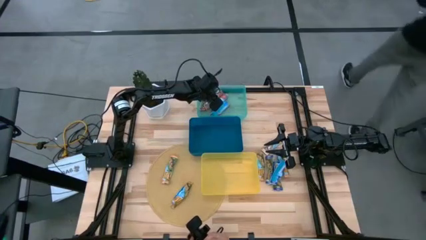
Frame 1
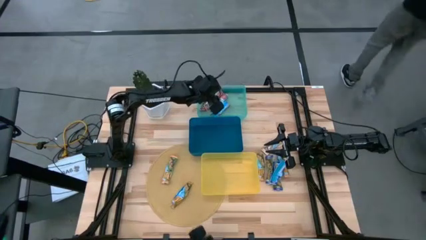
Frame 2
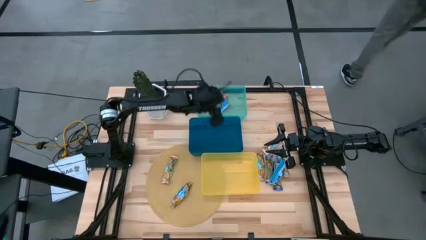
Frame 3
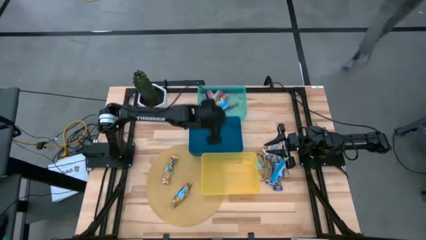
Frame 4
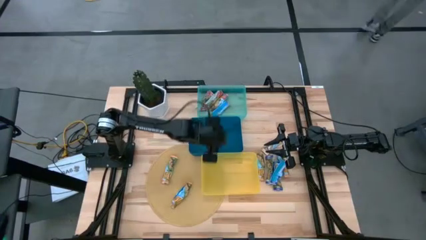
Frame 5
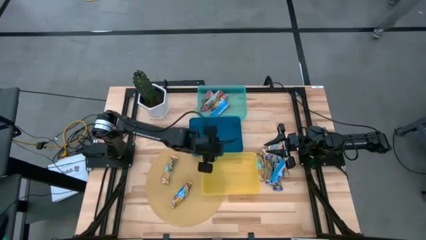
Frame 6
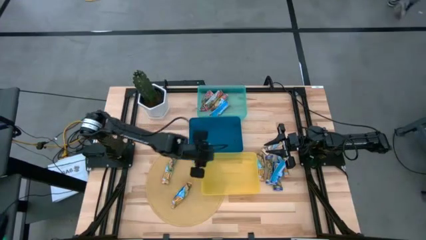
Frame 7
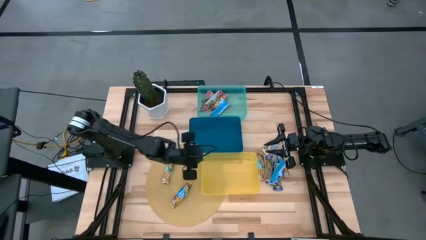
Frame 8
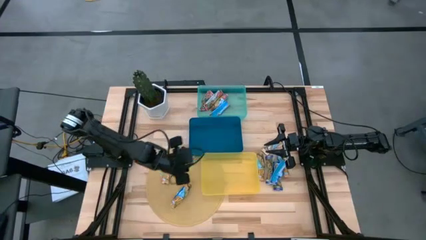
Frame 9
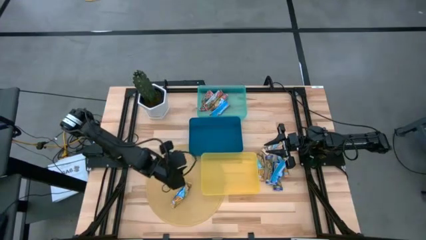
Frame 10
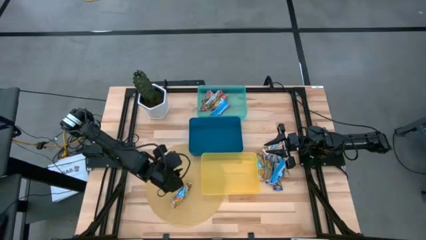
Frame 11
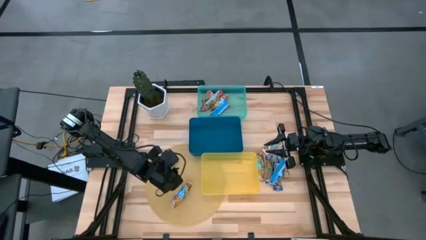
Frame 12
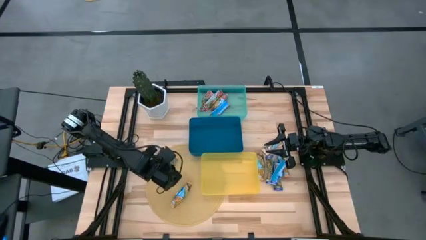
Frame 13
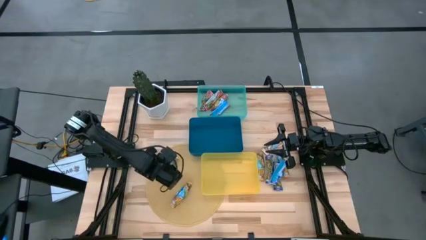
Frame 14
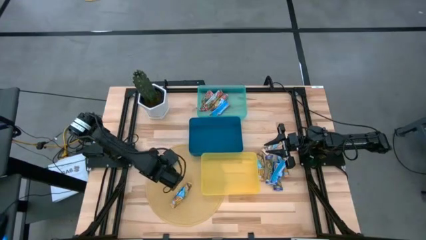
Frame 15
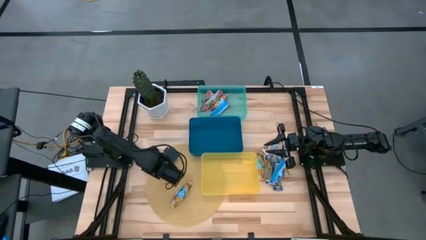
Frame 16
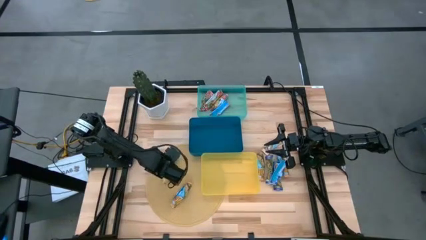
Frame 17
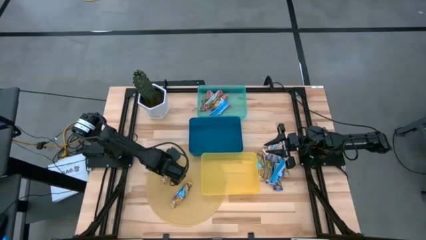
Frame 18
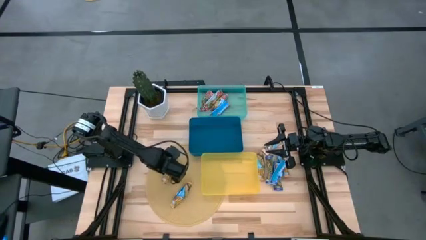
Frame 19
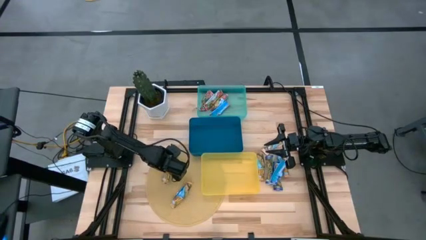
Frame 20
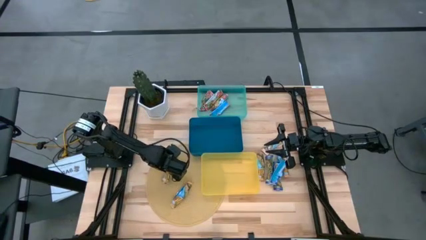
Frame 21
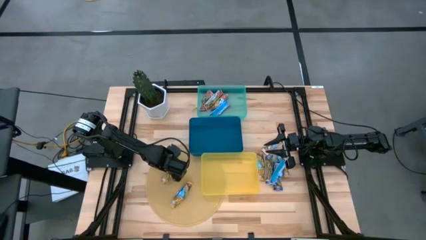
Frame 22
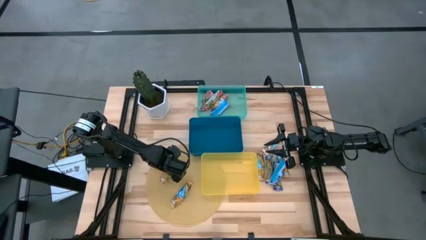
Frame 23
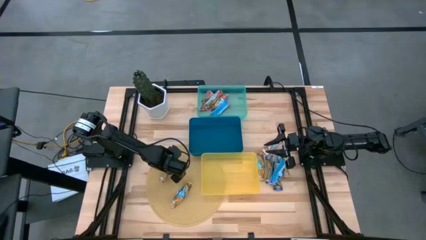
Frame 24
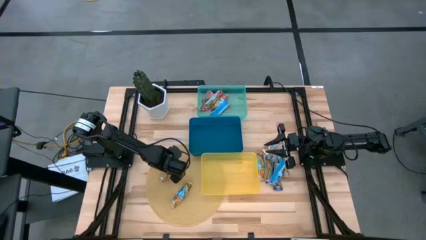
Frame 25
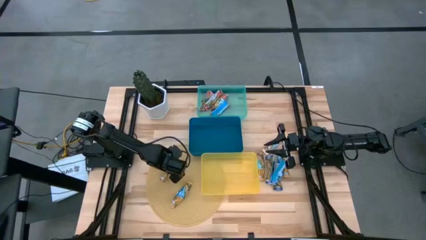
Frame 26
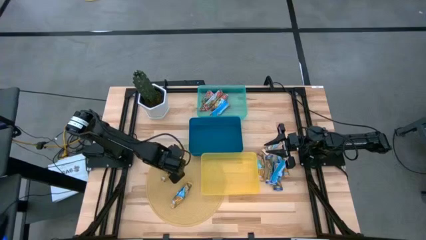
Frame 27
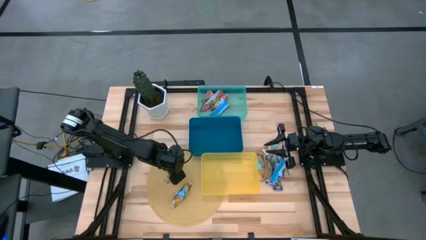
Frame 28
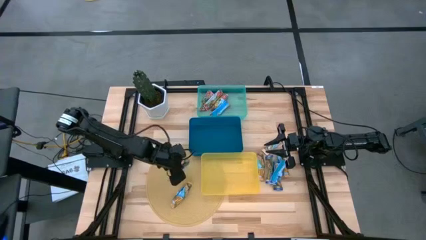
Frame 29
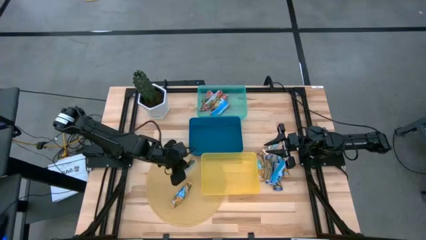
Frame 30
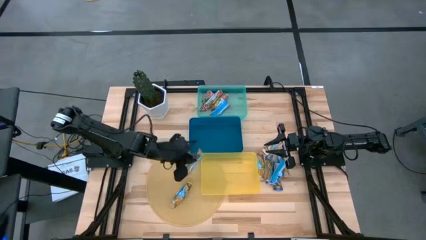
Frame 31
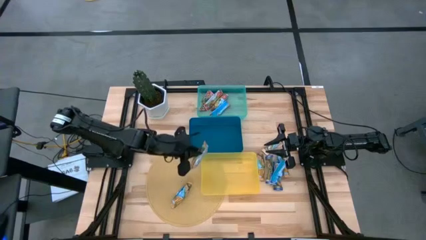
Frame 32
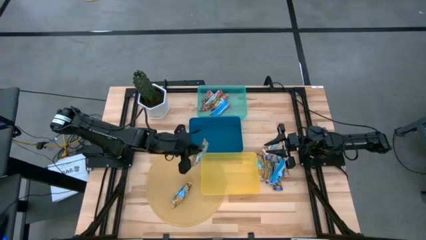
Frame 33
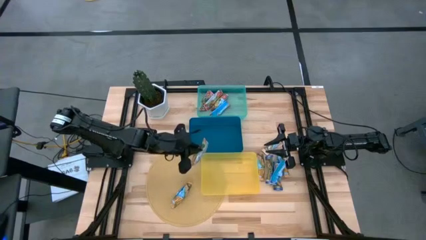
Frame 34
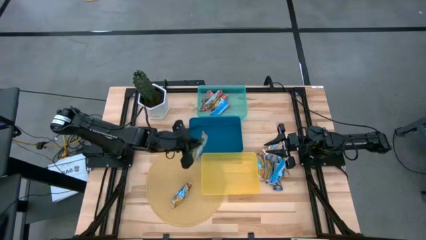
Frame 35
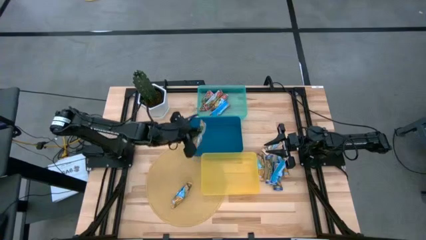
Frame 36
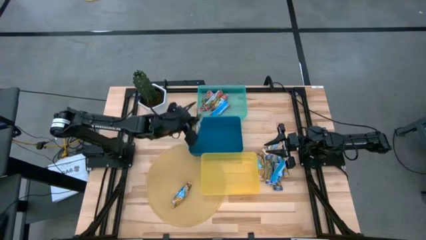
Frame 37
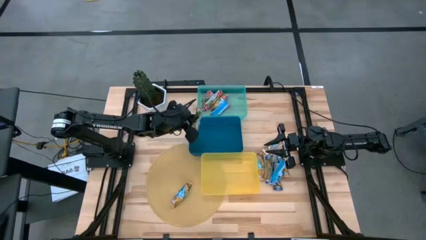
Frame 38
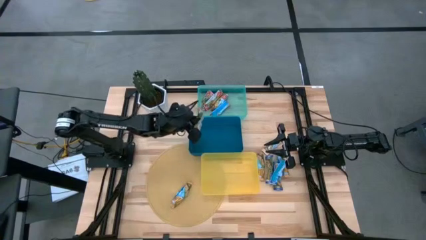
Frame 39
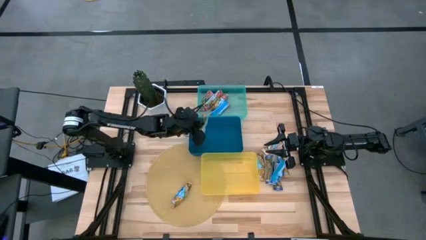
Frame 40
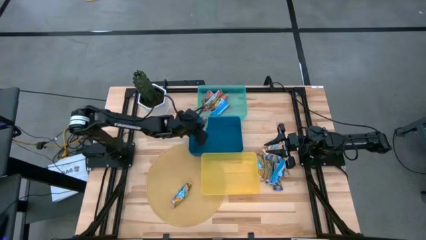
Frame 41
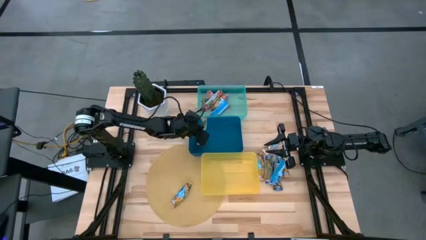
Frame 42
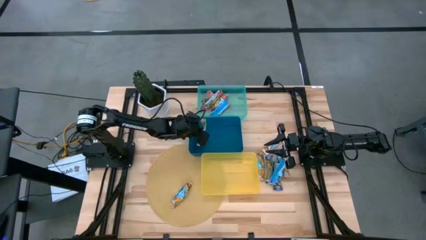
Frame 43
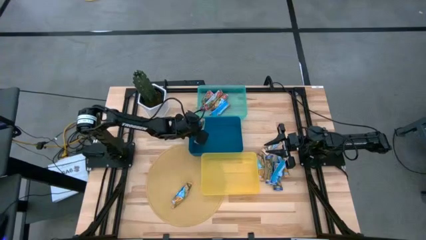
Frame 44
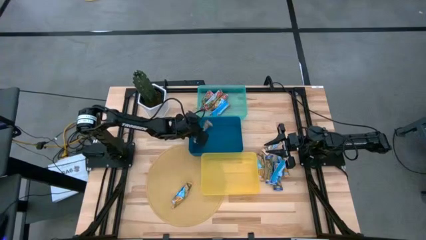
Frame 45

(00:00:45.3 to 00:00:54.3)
Task: Pick and place Granola Bars by type
Put the yellow granola bar into the blue bin

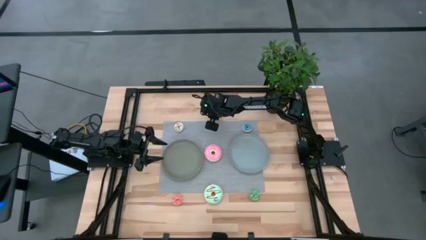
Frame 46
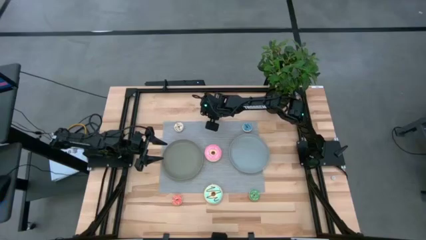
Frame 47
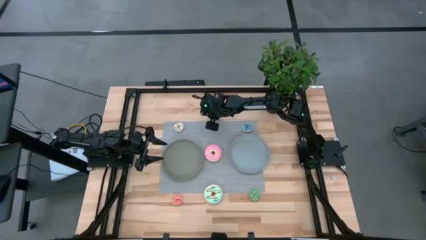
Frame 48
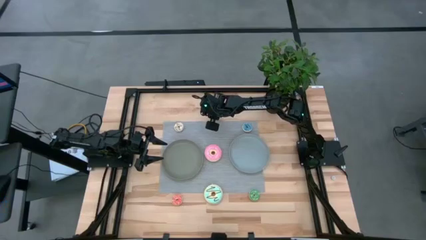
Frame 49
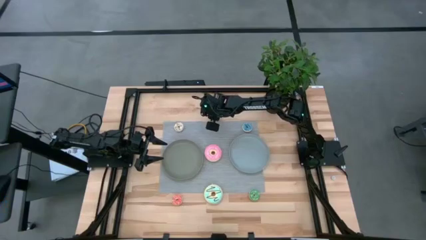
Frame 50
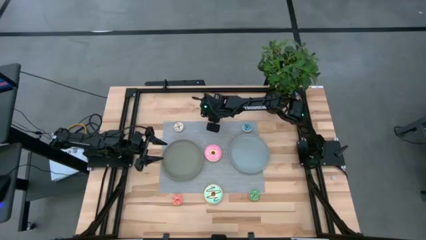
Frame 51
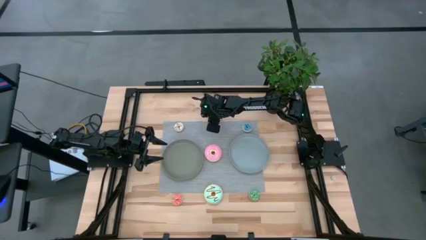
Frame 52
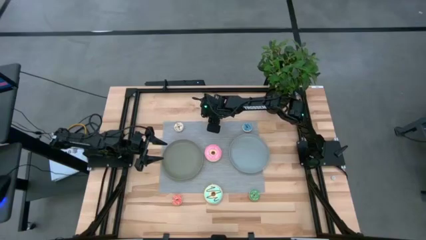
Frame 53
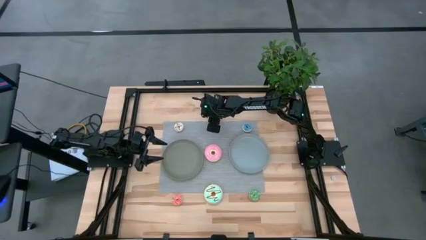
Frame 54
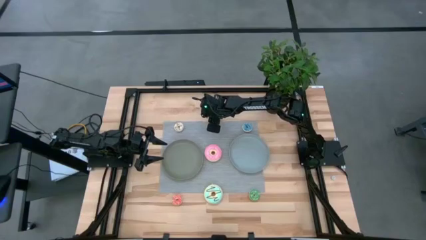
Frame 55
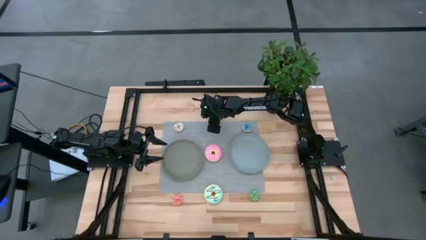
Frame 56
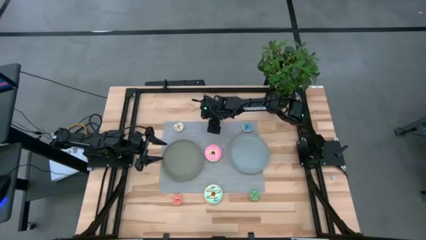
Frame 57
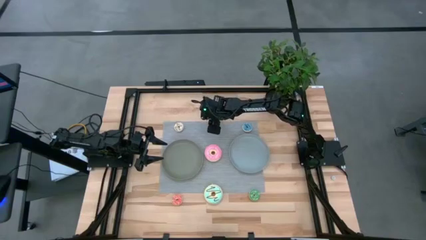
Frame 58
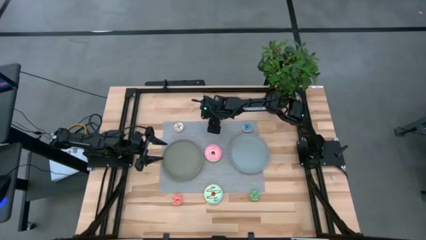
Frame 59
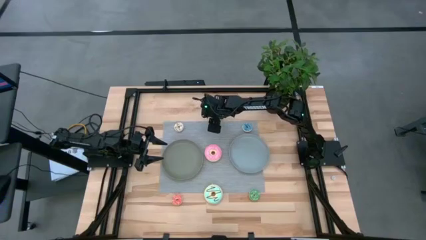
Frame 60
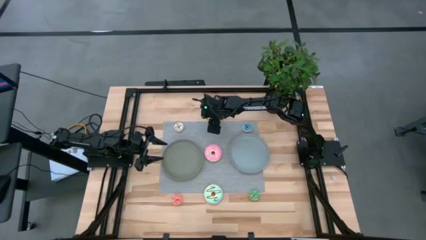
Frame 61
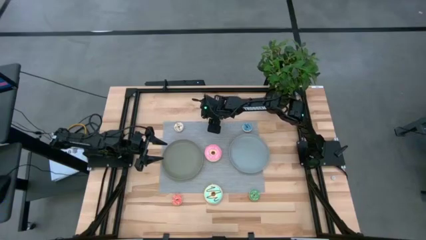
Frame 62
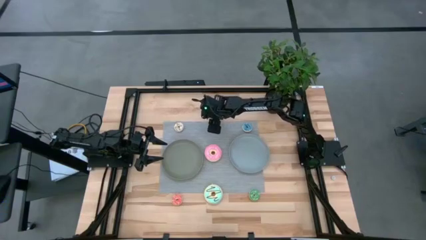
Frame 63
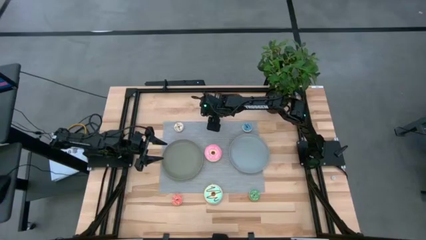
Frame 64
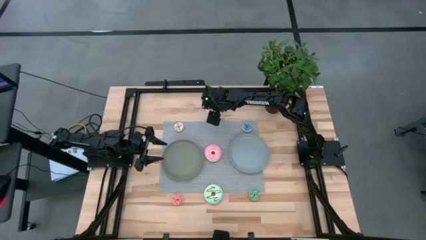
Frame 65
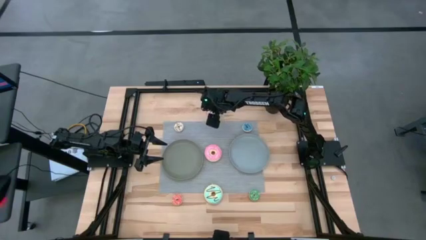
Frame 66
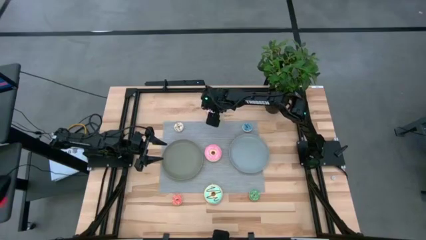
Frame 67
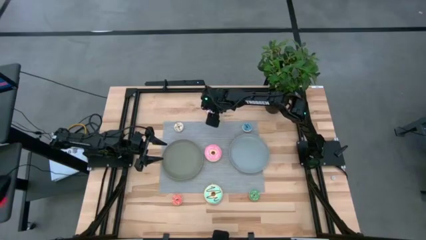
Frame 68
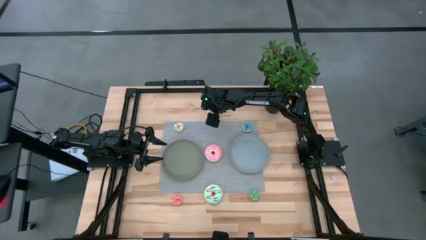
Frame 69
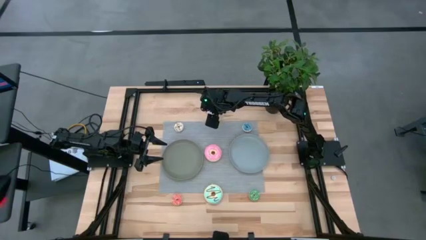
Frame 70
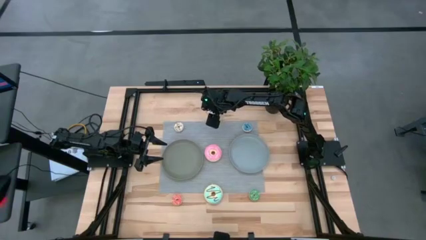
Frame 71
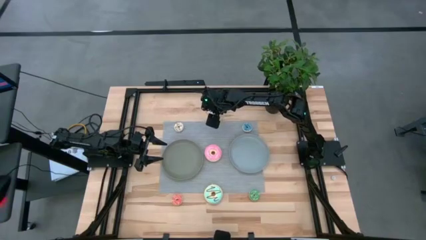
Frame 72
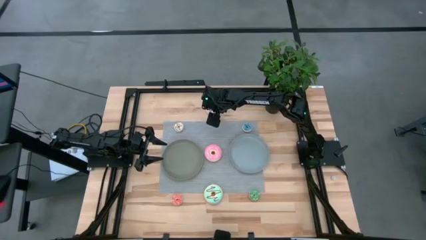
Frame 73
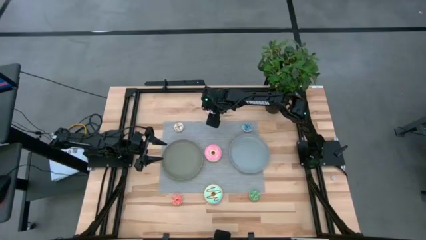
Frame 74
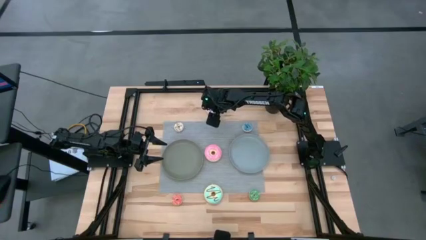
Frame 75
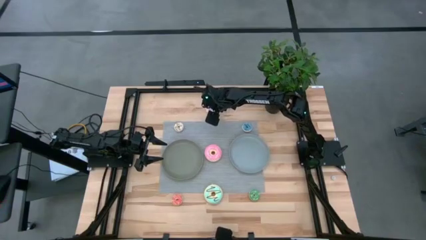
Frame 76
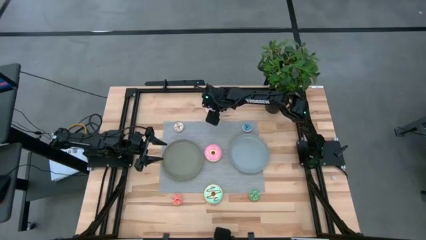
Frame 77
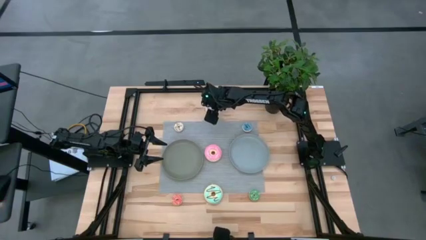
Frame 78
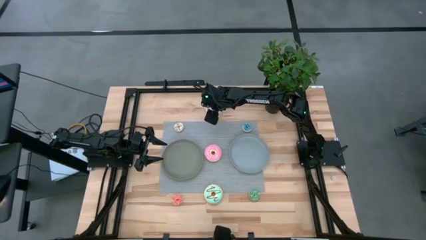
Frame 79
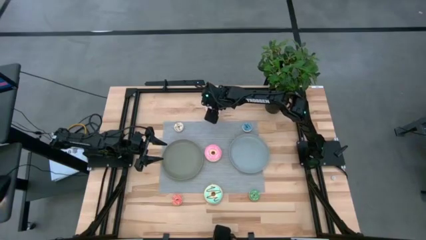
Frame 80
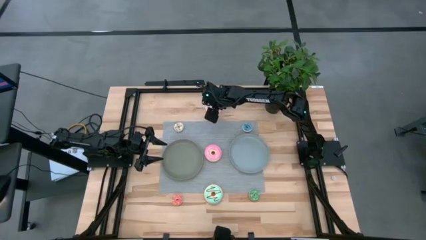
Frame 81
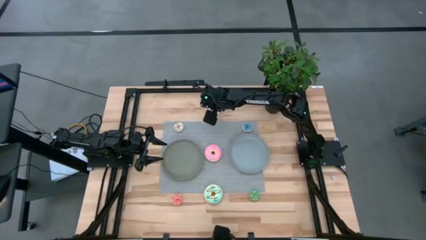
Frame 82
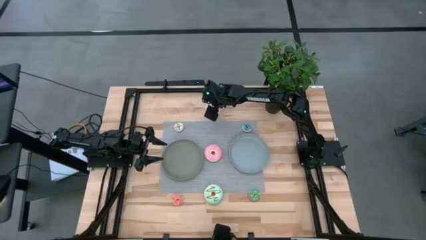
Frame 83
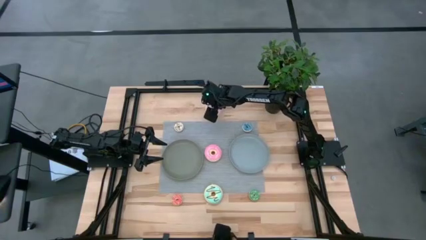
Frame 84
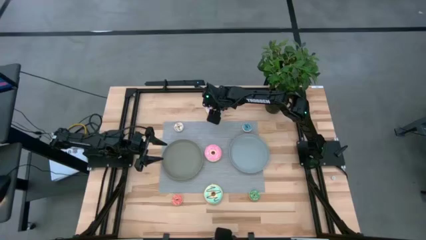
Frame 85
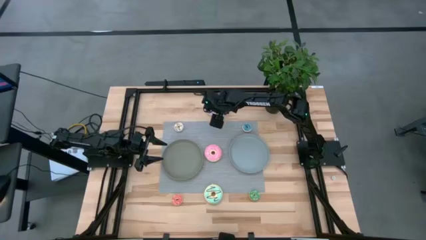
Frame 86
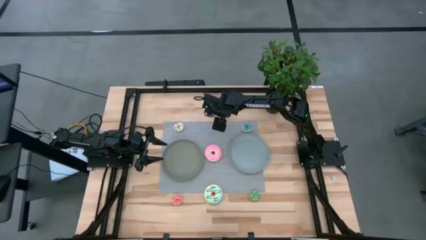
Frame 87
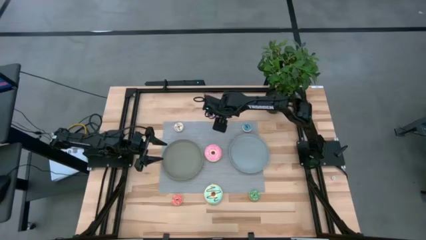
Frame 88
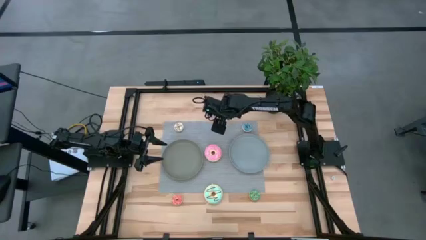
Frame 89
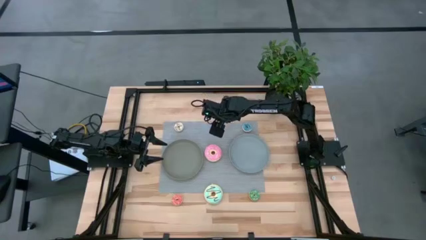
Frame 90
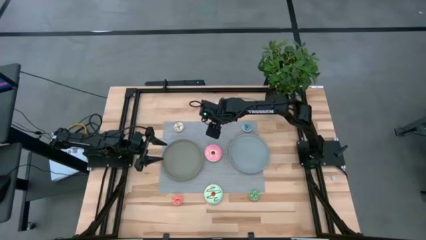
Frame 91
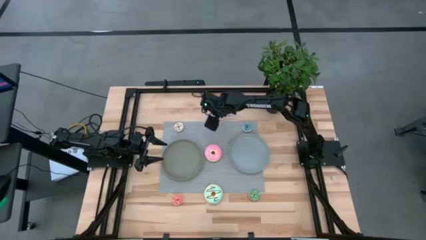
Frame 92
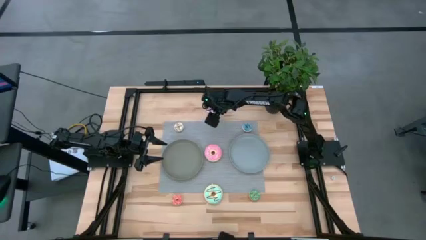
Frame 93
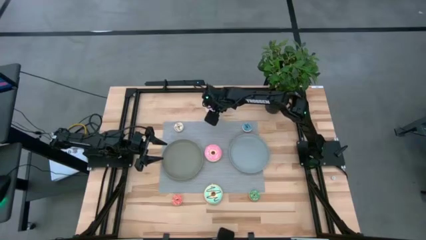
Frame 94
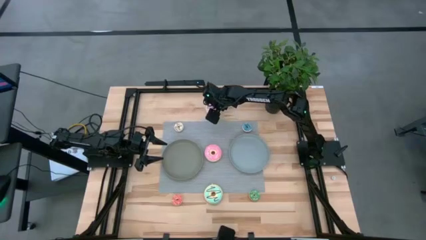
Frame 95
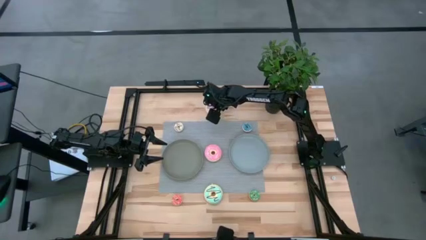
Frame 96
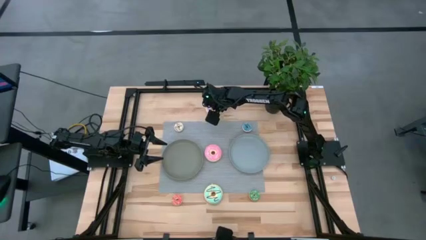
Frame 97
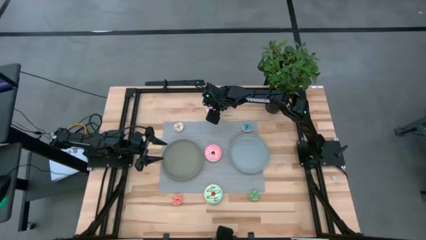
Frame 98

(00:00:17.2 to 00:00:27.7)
Task: Pick & Place donuts
Put the big purple donut into the blue plate
